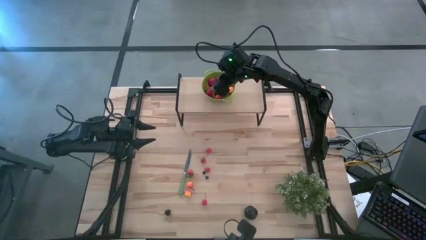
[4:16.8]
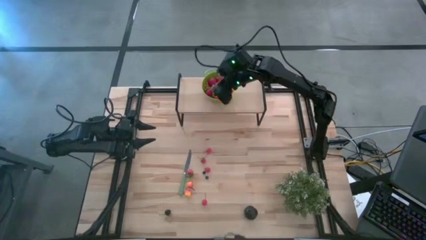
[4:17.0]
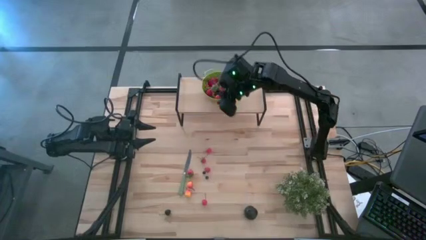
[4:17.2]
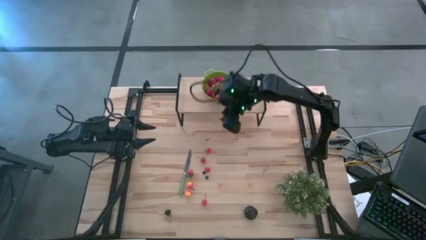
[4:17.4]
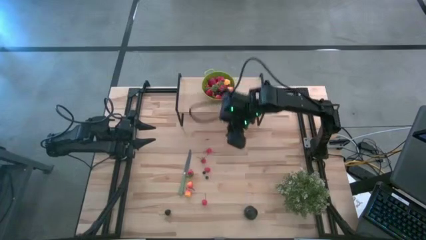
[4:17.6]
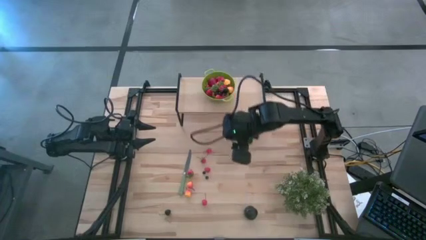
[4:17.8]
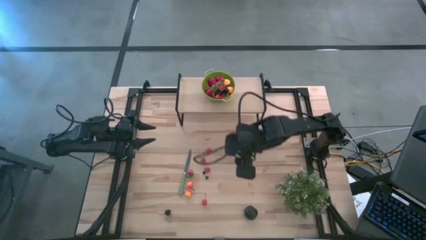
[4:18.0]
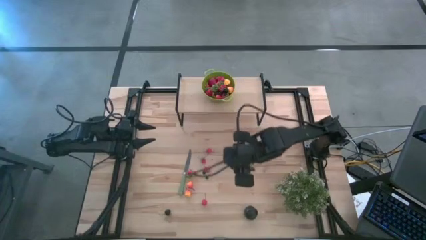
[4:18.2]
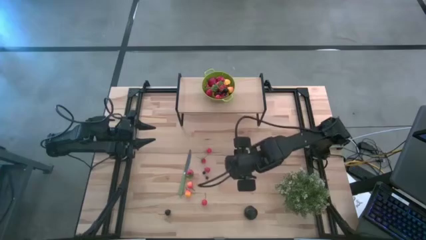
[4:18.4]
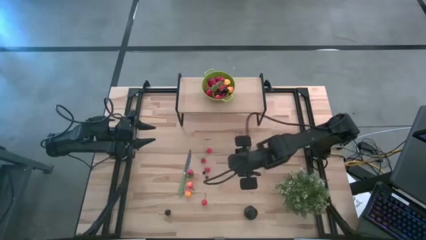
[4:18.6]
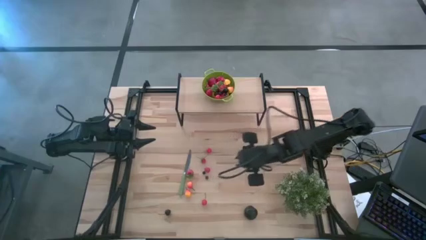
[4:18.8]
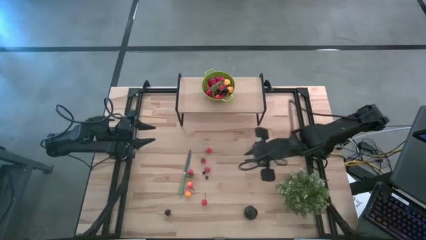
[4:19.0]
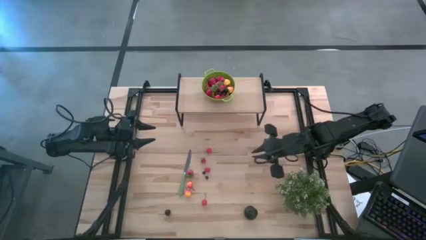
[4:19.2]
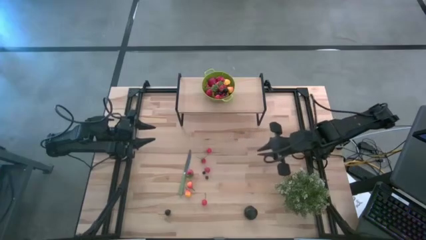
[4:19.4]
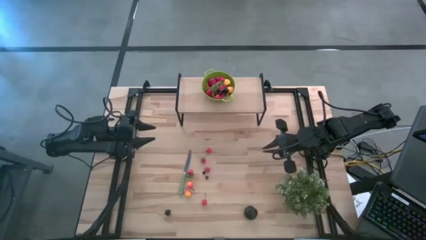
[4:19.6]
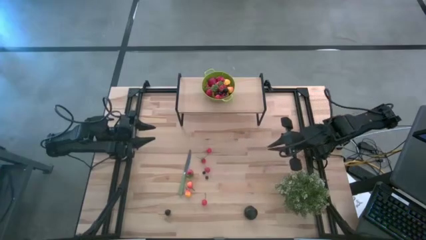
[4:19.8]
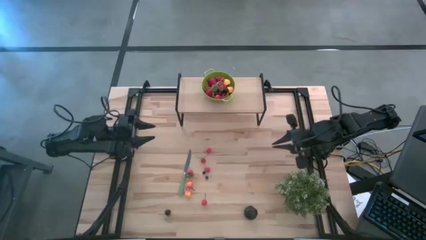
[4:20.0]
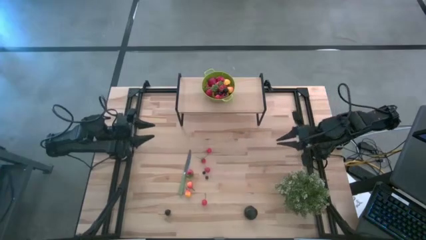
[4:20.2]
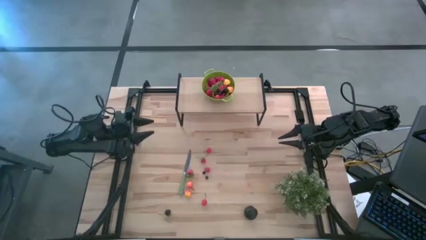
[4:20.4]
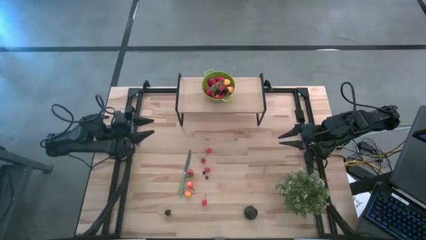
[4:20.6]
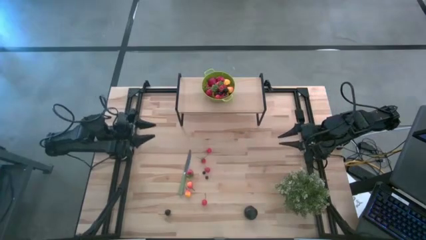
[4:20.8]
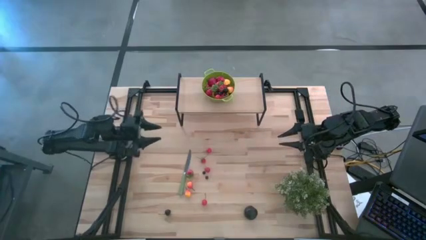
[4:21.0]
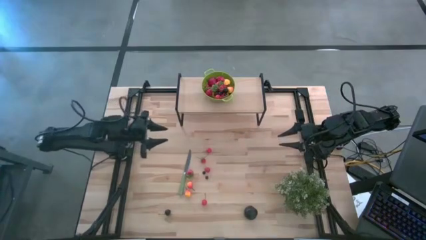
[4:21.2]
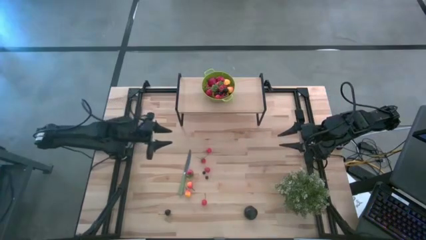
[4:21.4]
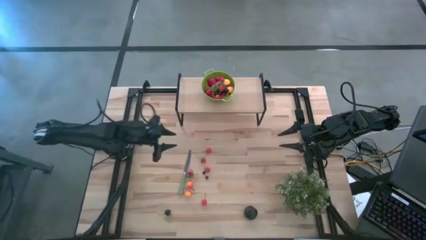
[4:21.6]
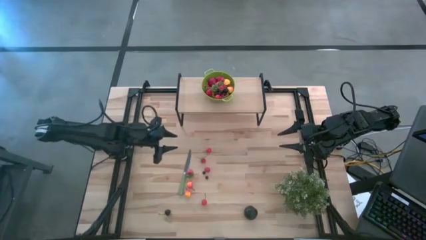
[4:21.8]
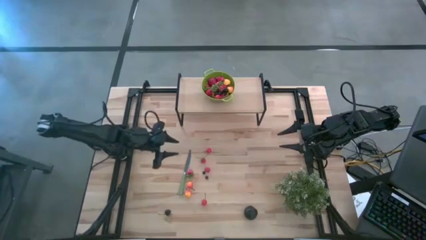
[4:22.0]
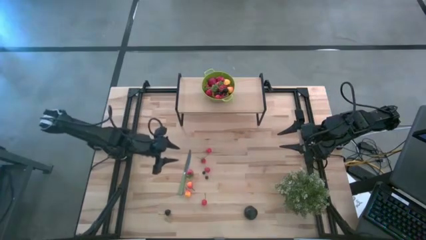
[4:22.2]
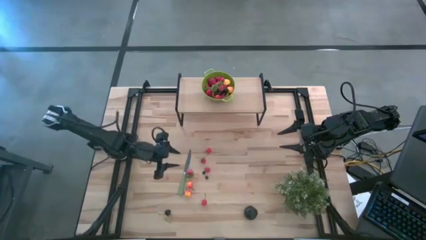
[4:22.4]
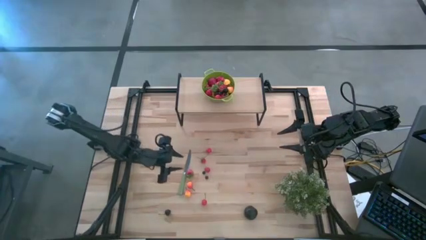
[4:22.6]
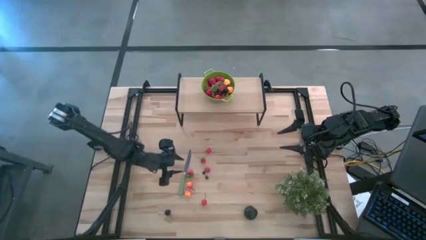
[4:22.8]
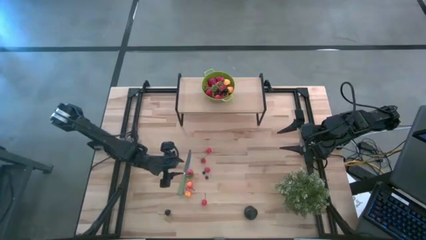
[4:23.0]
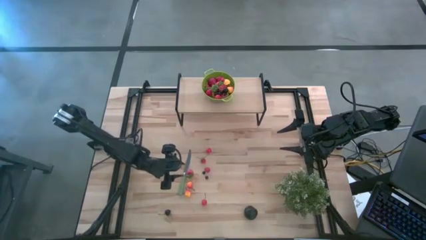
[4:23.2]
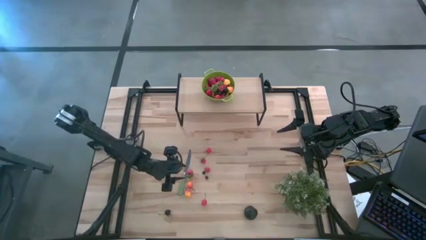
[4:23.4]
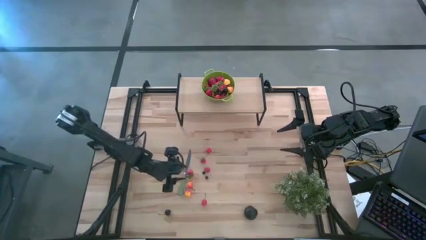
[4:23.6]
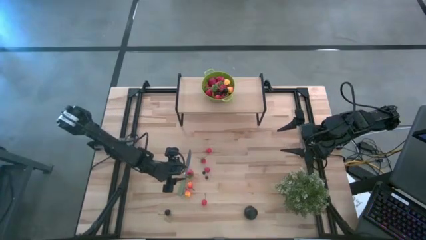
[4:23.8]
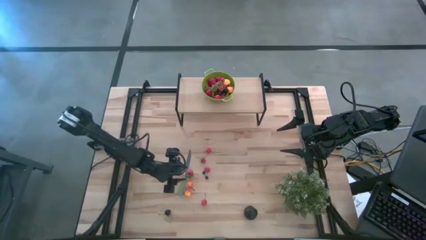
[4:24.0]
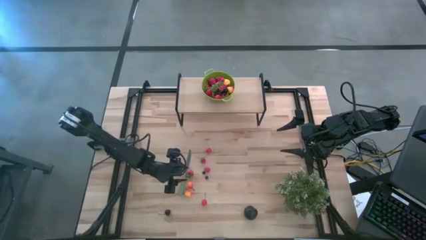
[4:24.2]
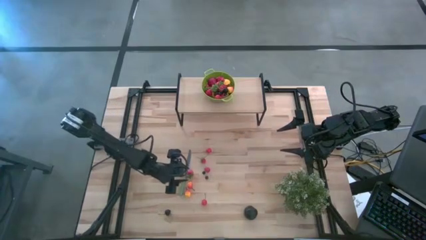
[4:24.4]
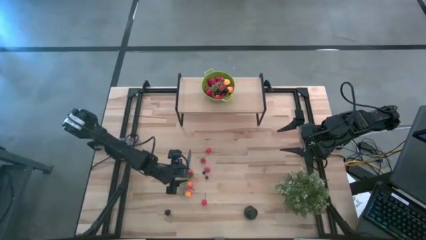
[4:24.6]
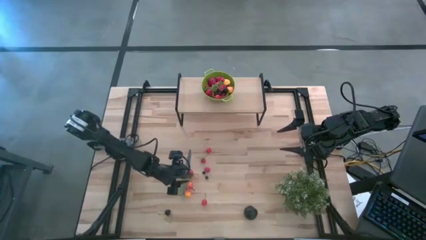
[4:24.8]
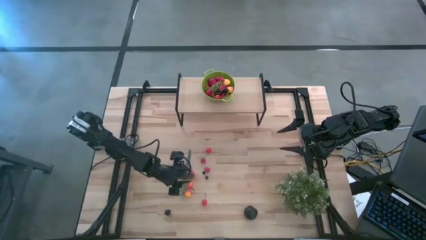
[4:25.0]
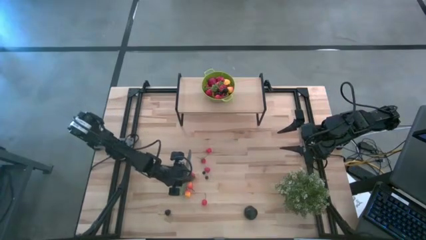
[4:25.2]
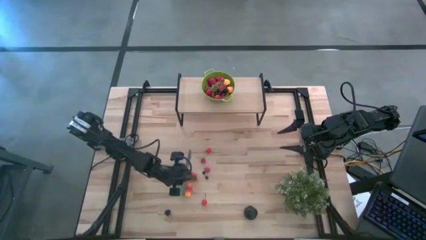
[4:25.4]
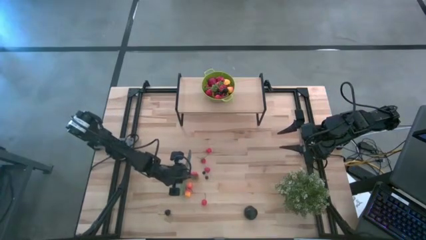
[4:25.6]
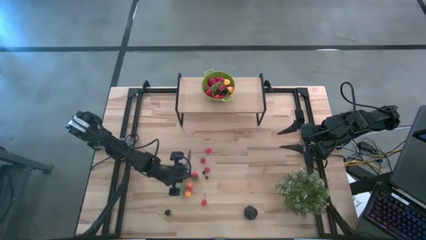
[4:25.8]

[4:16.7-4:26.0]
Task: Pick & Place Fruit
Put the strawberry into the green colander on the shelf

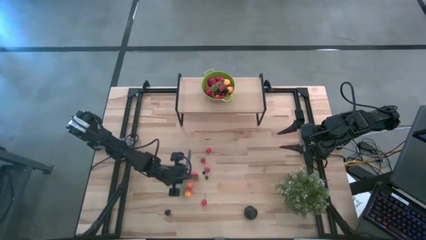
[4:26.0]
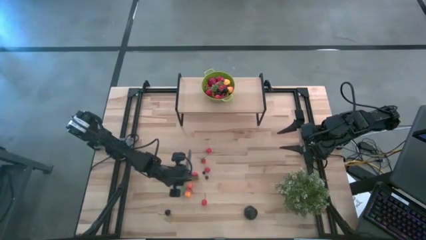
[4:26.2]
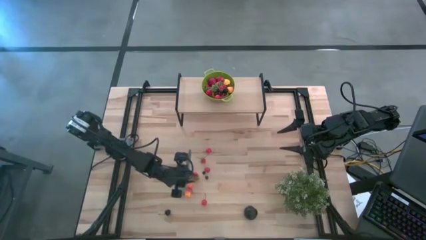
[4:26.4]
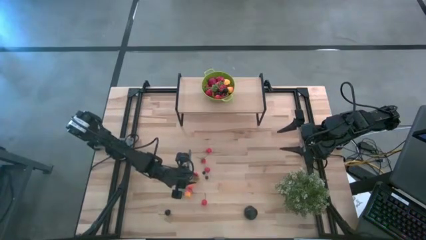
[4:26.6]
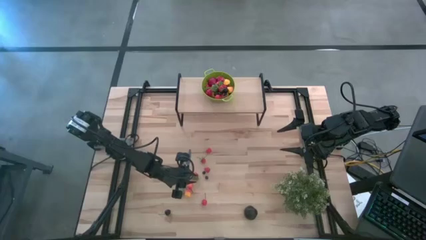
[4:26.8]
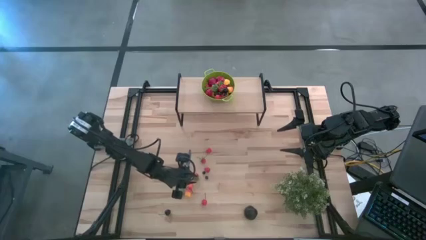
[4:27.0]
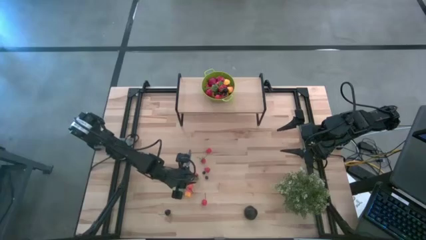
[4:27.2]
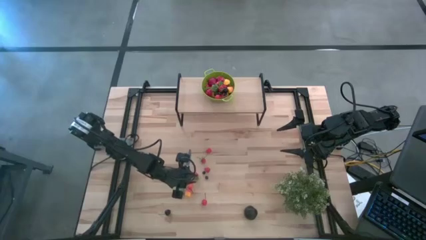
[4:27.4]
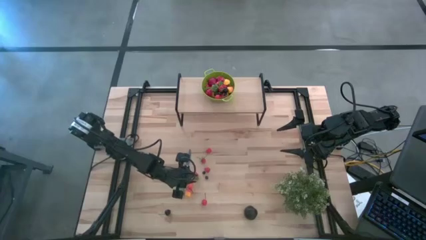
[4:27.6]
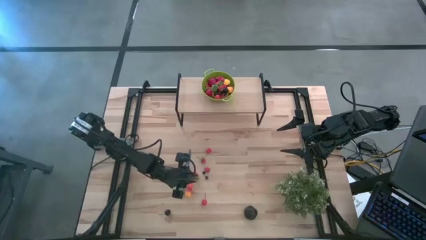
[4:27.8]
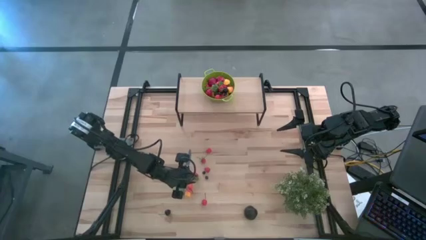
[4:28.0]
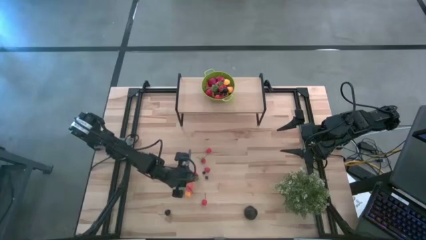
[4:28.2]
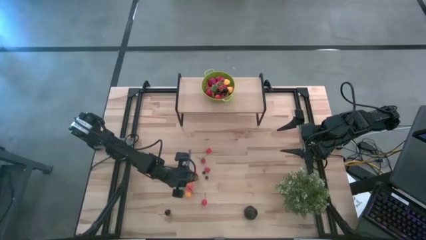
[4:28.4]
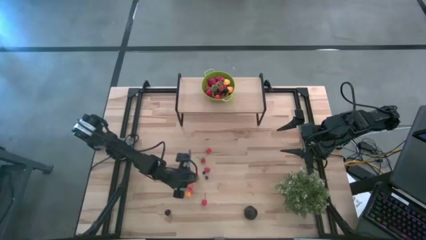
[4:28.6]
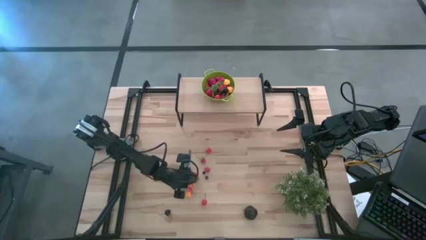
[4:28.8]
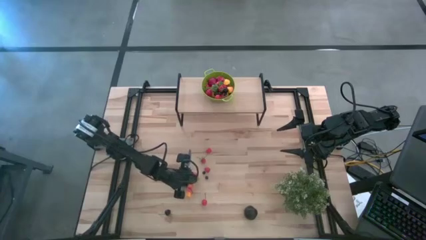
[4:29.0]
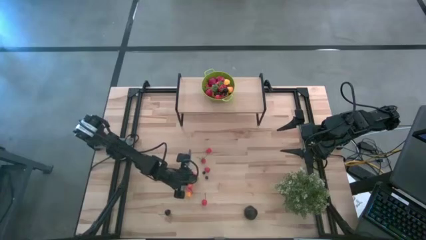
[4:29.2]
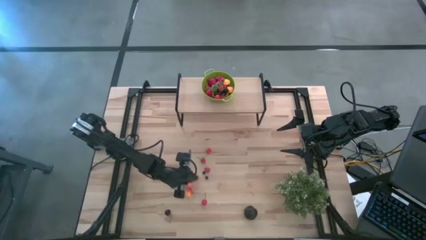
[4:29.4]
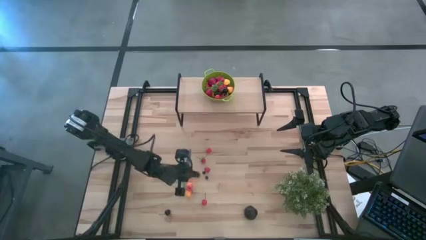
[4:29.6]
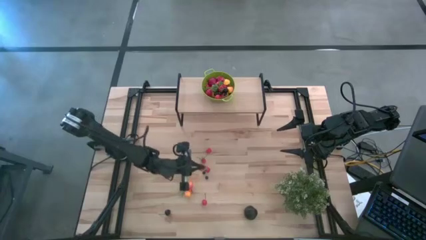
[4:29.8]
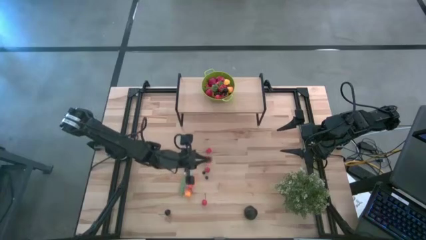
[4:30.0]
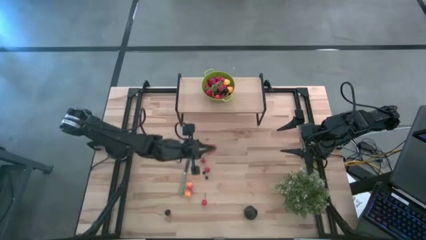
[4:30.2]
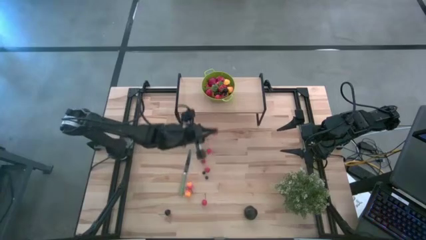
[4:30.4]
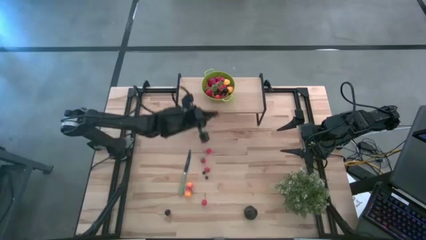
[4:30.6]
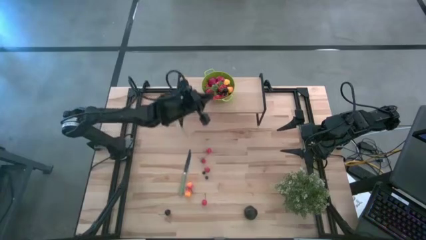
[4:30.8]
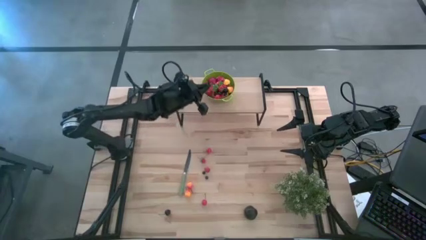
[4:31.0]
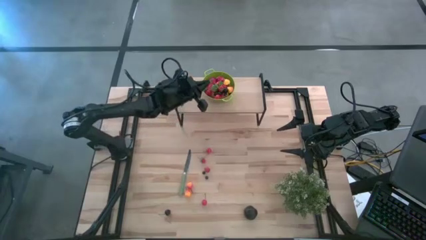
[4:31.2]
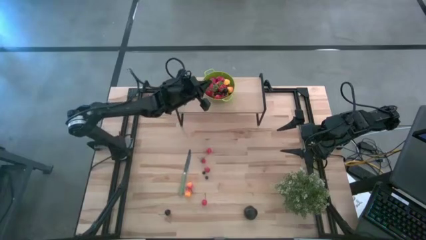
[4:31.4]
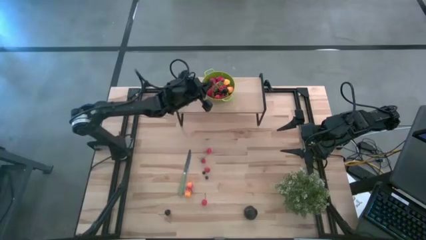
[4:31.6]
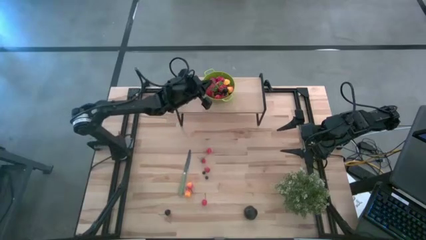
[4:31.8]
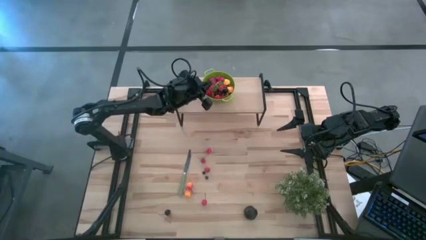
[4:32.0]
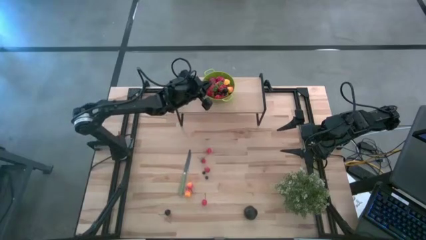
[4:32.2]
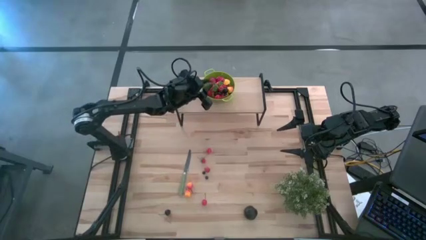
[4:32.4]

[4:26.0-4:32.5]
Put the strawberry into the green colander on the shelf
